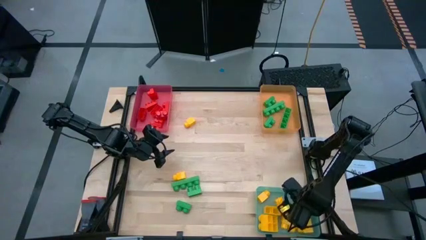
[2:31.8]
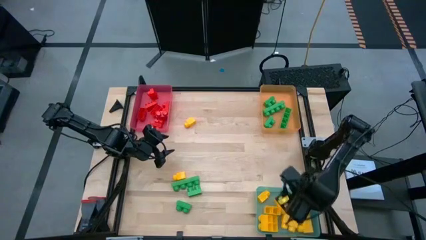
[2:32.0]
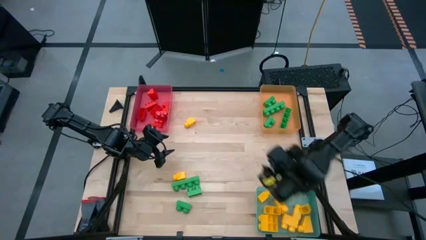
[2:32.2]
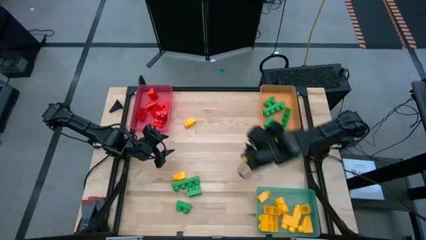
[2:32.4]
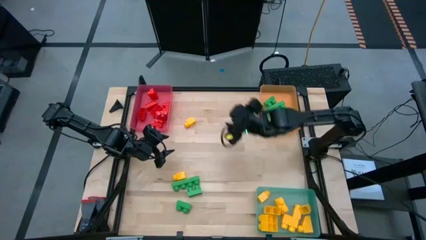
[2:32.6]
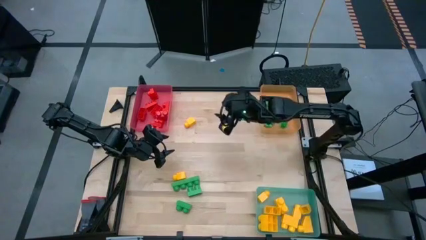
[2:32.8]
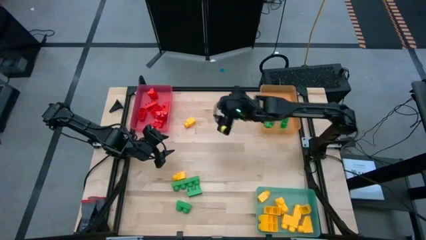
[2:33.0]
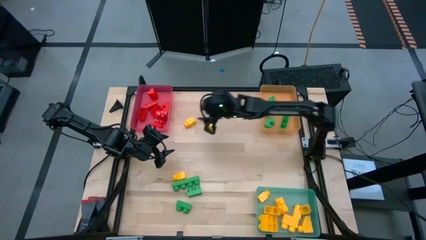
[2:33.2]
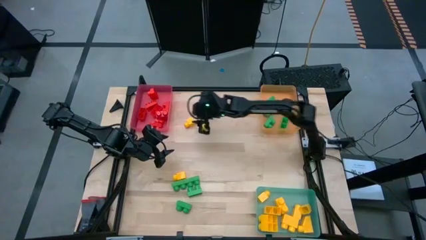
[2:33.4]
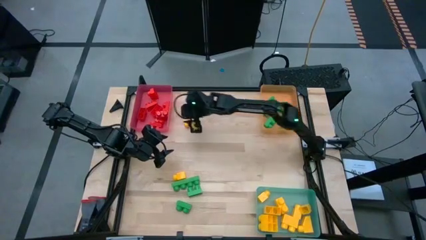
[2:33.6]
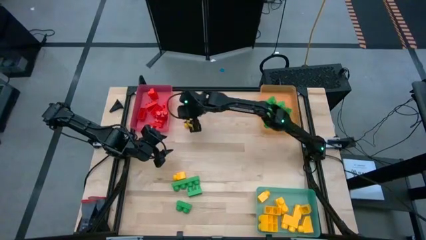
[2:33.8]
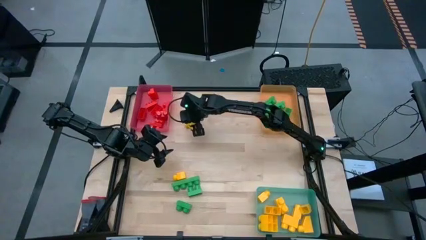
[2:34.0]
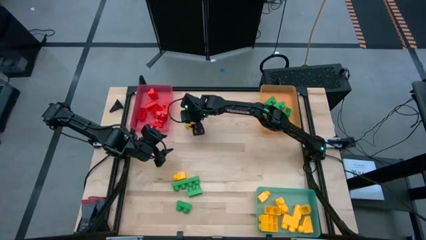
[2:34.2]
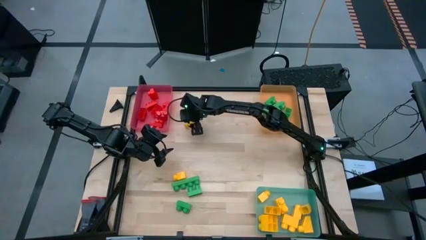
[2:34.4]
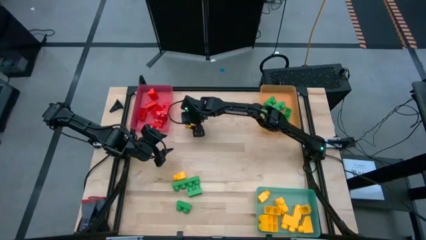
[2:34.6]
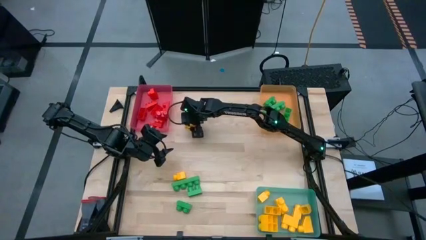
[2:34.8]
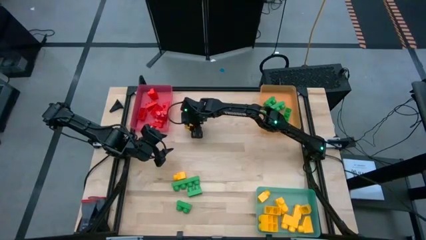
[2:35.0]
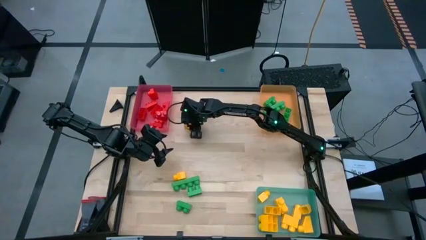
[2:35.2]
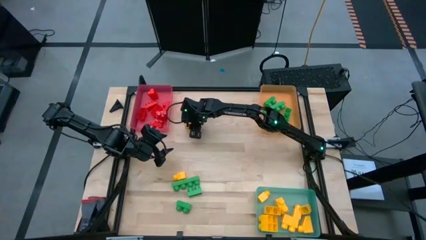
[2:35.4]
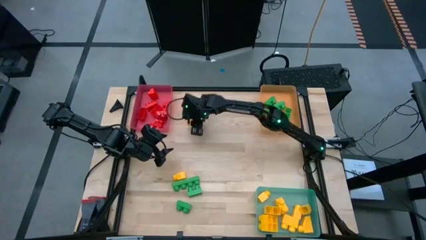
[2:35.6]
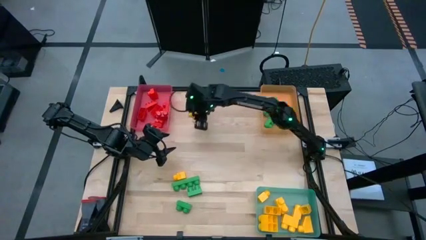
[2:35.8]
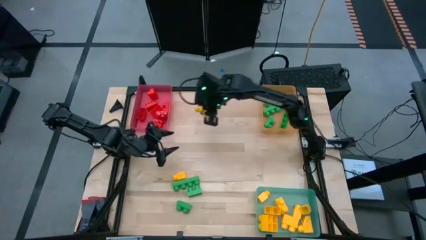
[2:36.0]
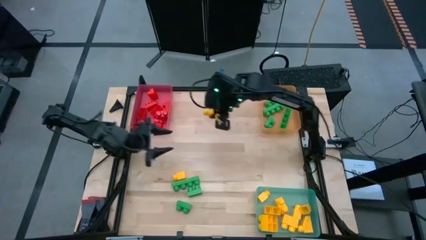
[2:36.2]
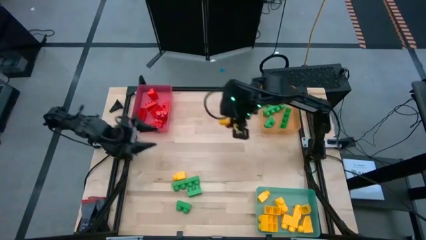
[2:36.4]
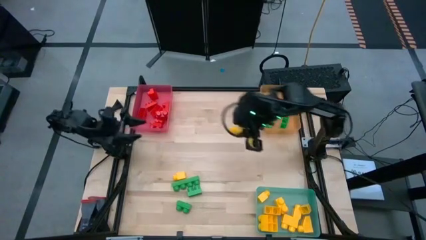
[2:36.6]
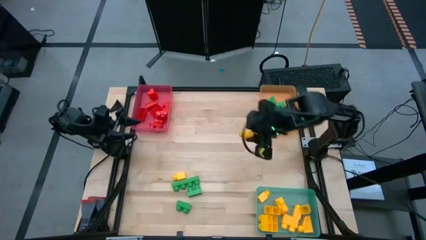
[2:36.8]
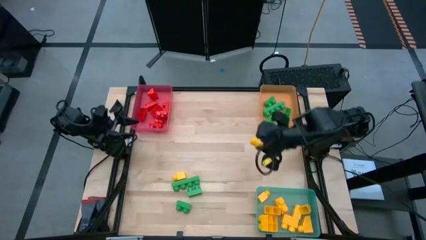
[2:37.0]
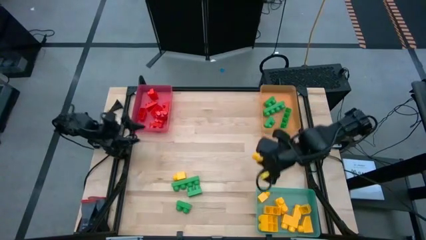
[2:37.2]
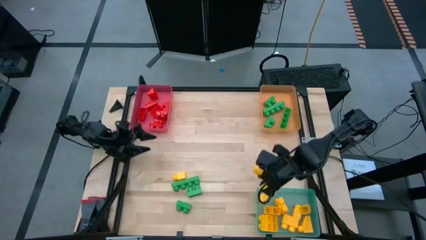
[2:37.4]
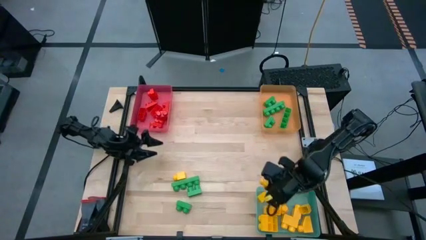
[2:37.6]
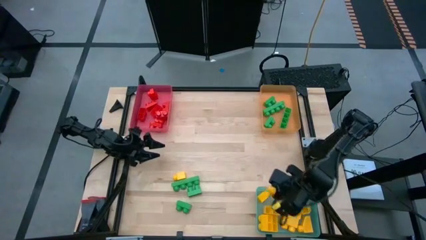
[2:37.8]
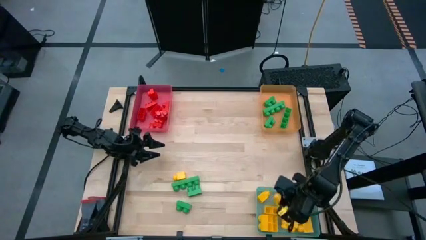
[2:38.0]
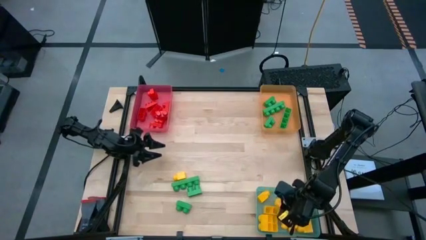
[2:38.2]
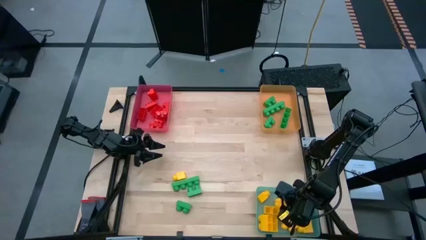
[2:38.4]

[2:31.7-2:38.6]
Task: Sort blocks
Put the yellow game piece into the blue bin

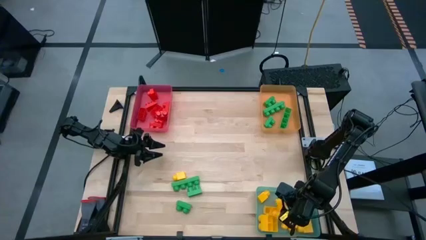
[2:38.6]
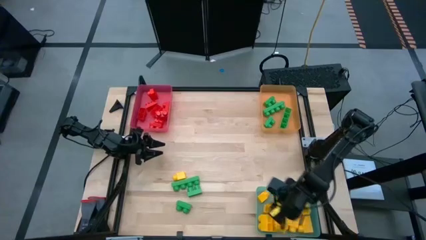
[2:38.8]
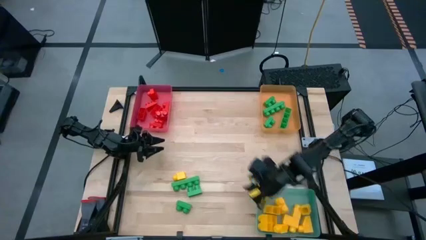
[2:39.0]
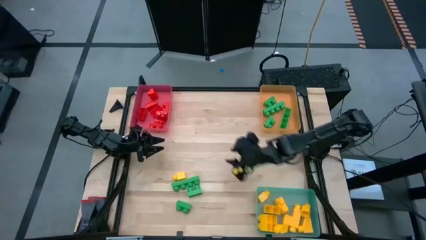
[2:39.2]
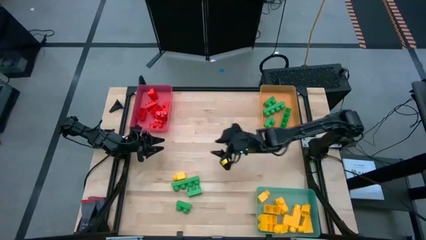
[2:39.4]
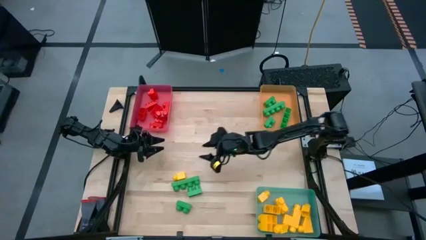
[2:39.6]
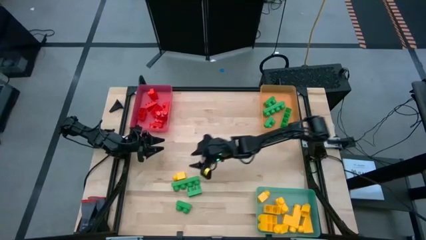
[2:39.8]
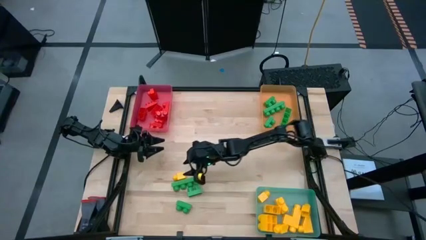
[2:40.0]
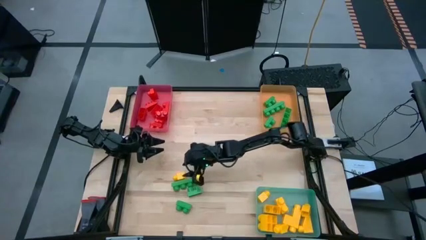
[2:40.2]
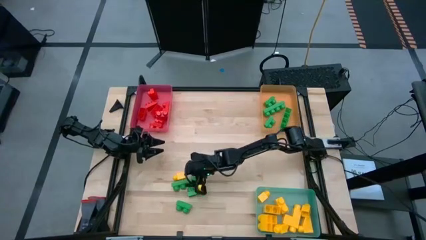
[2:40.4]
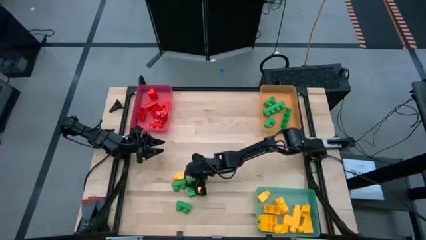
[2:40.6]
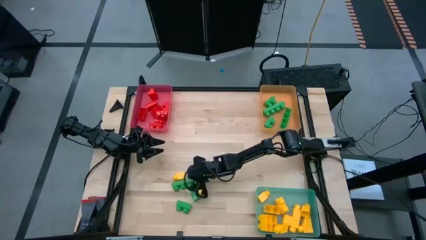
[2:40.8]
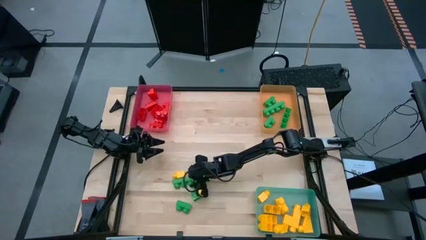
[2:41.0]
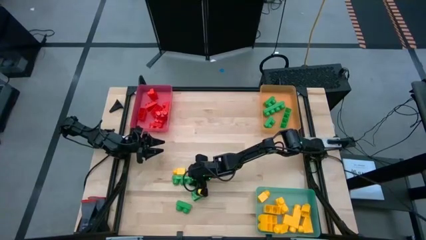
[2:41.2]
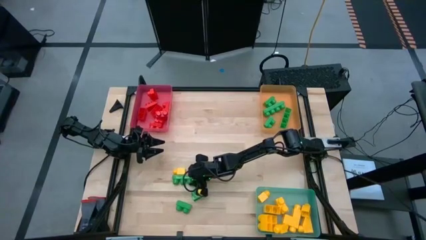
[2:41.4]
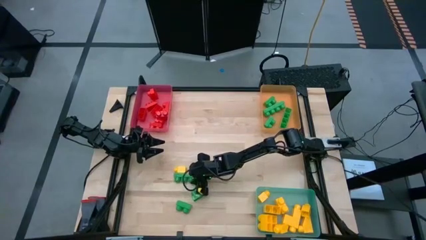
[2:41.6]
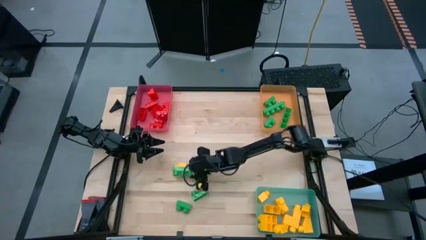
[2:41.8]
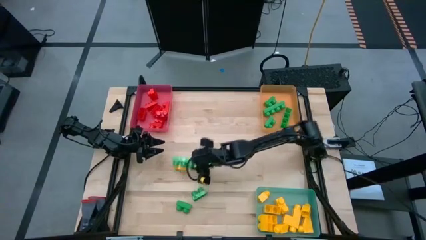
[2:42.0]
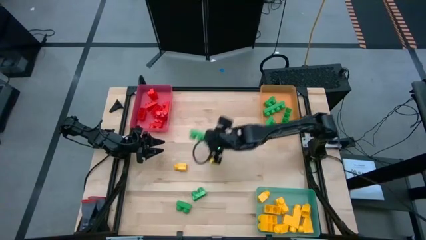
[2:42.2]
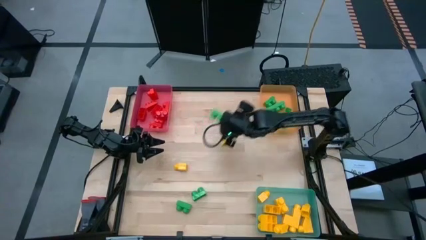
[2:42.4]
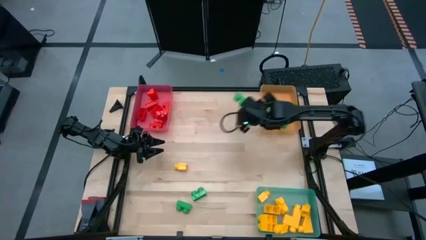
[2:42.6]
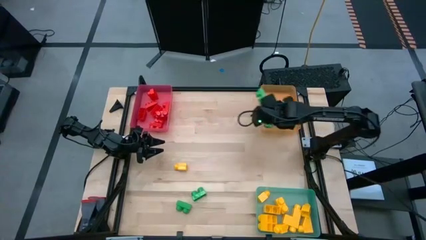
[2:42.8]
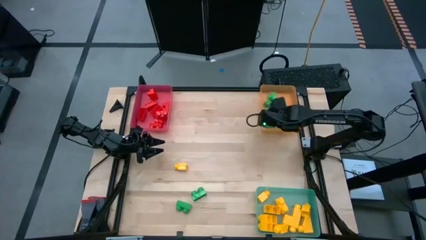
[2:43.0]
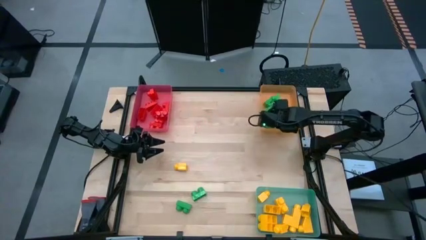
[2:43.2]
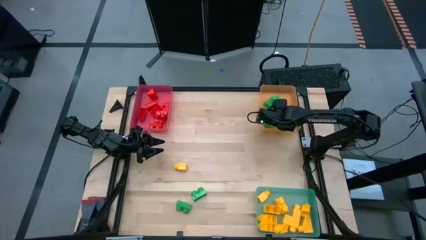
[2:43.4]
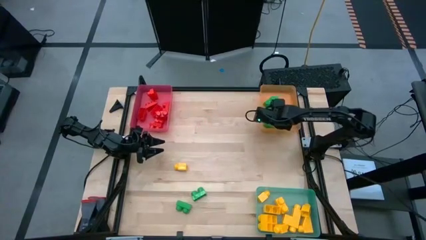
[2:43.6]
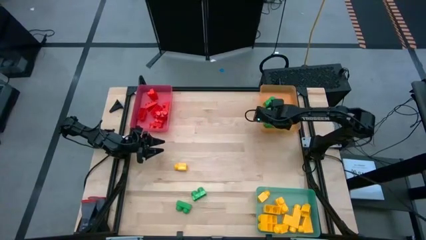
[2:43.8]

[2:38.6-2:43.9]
Put the green game piece into the orange bin

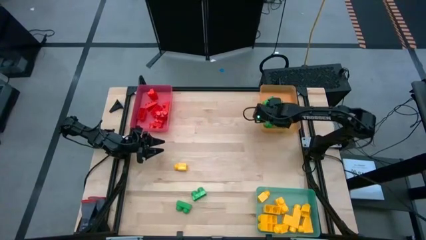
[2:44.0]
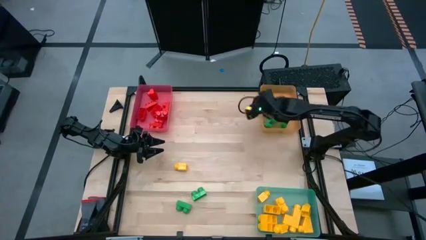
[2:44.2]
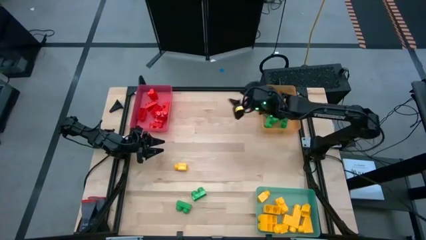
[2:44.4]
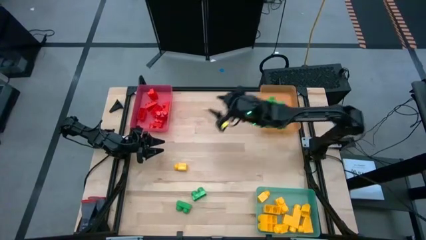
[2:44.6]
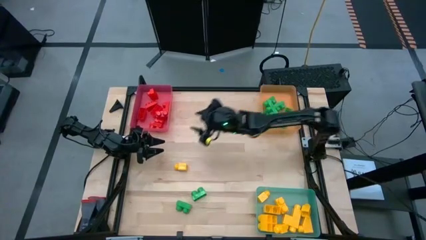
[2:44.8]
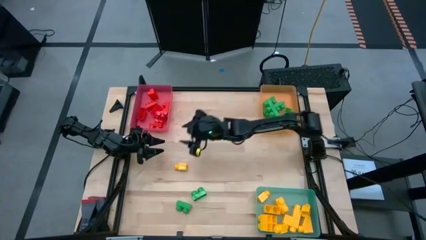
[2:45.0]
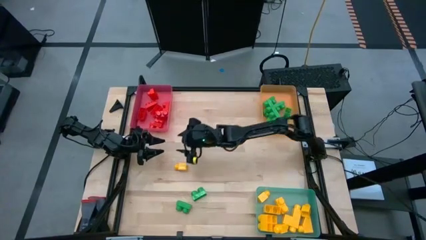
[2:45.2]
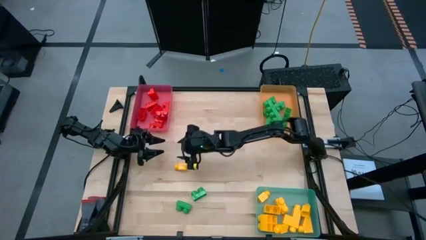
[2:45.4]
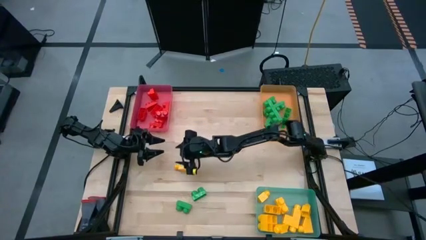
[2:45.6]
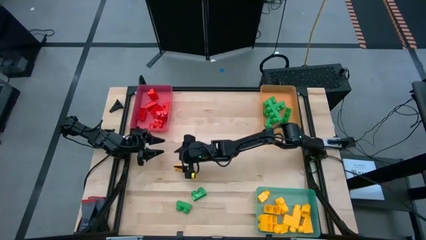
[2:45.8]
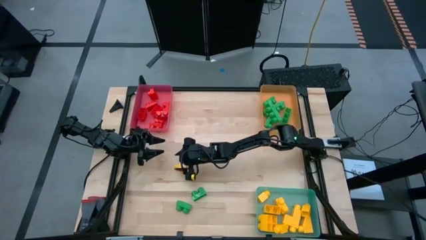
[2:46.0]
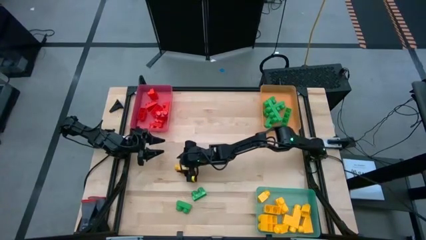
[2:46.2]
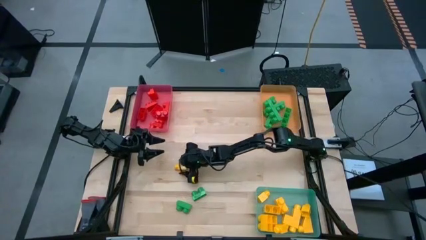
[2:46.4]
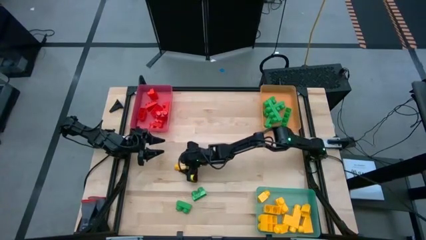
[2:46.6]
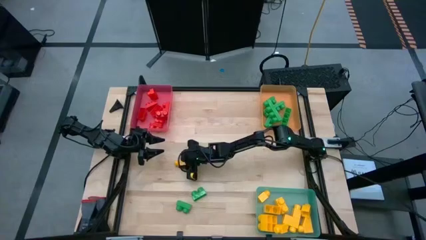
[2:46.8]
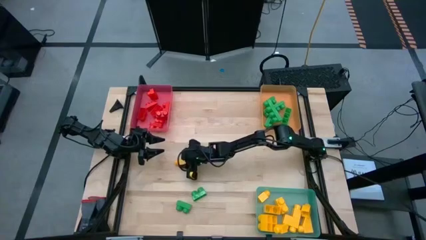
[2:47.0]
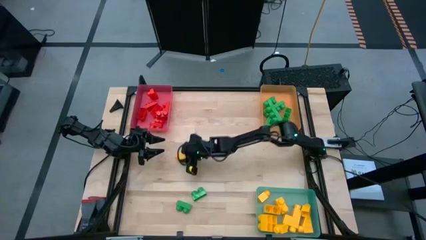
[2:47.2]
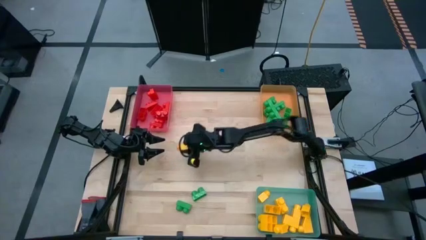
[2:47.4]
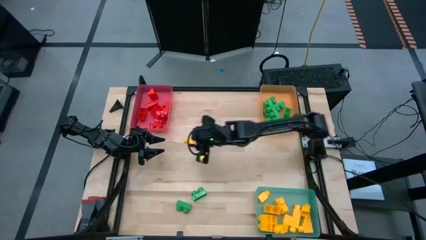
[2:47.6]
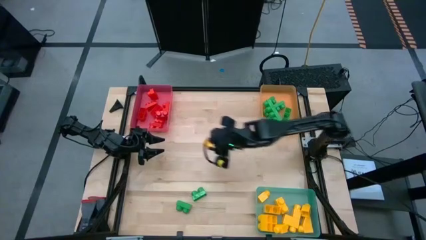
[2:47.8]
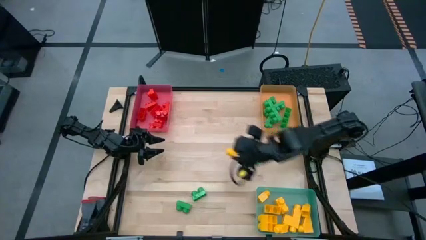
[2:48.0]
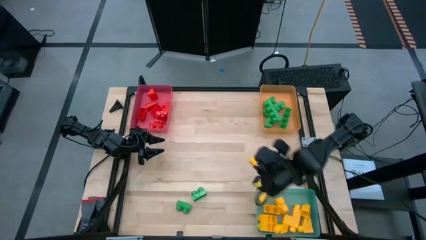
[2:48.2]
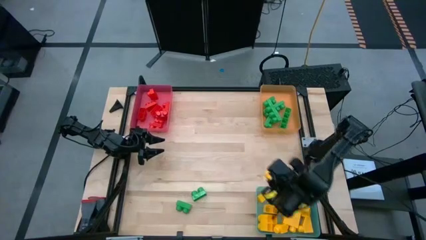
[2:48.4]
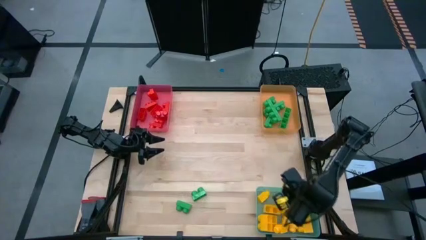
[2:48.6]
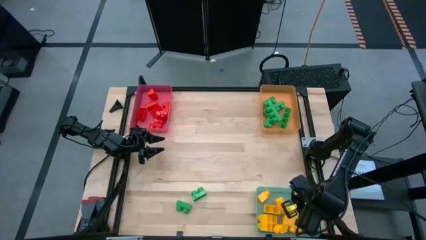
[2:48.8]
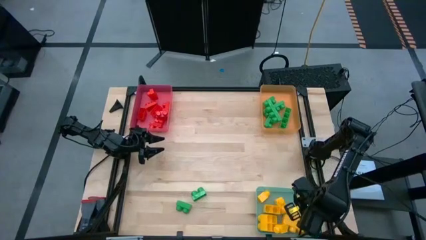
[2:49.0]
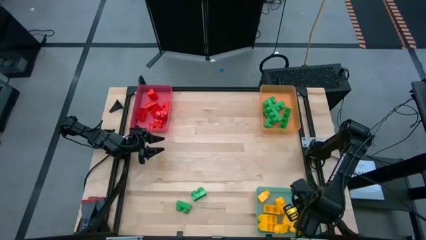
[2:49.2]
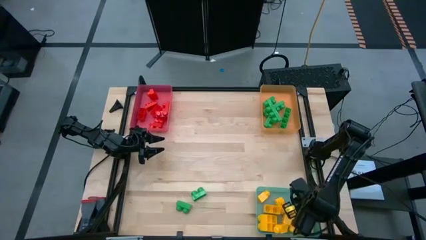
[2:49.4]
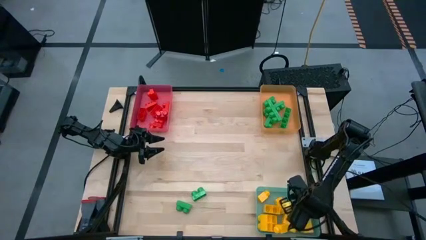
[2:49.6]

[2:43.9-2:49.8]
Put the yellow game piece into the blue bin
